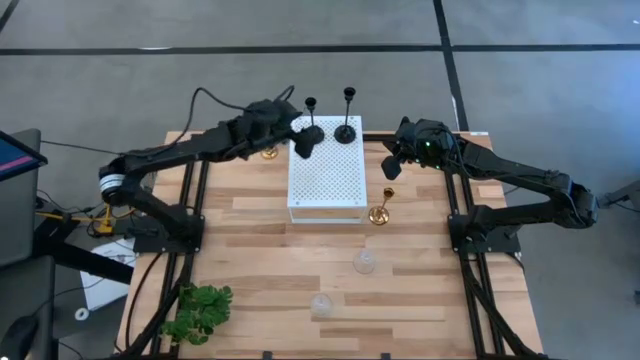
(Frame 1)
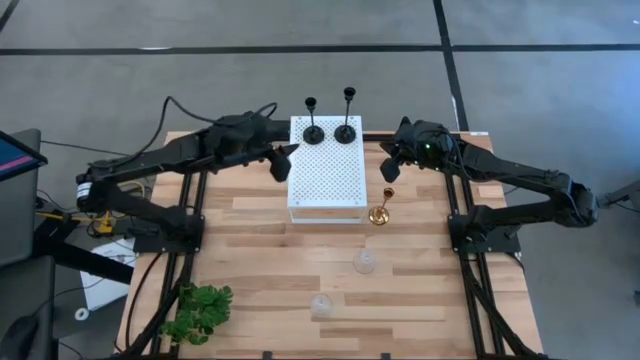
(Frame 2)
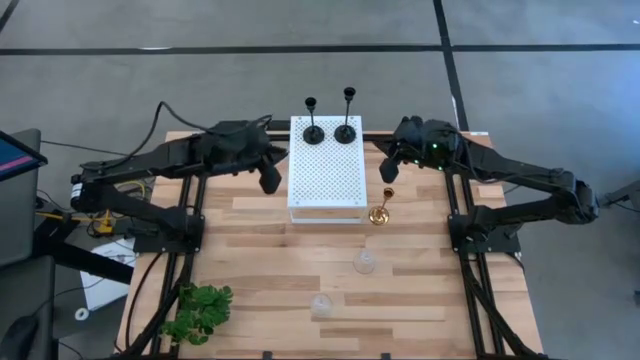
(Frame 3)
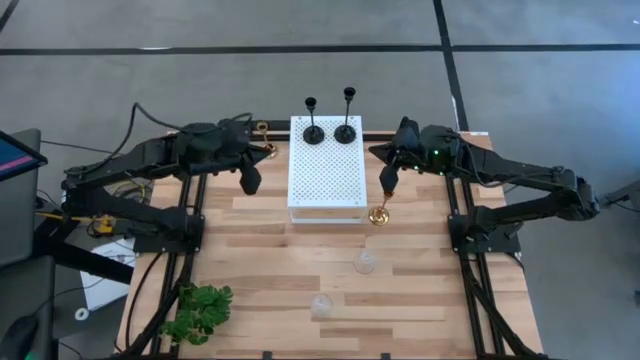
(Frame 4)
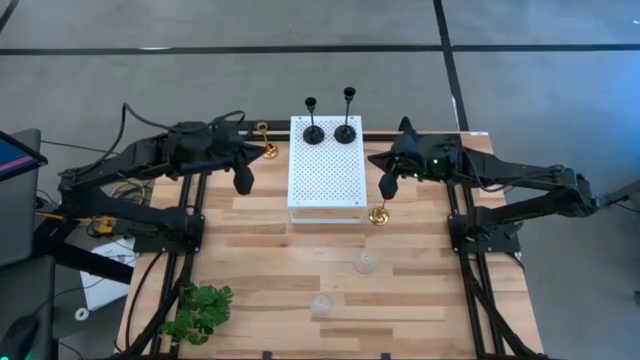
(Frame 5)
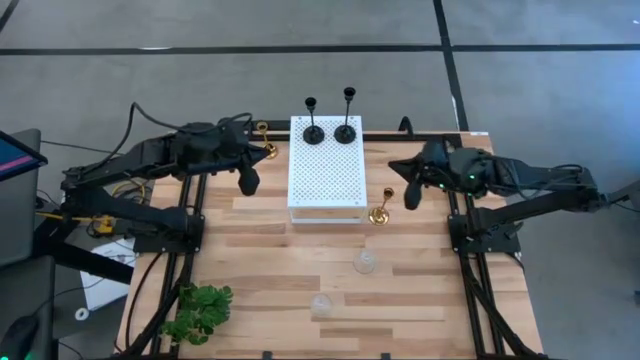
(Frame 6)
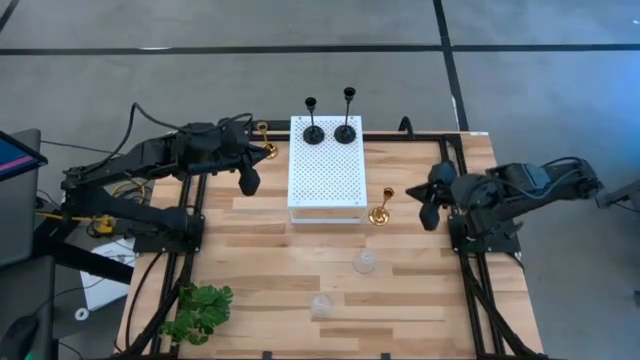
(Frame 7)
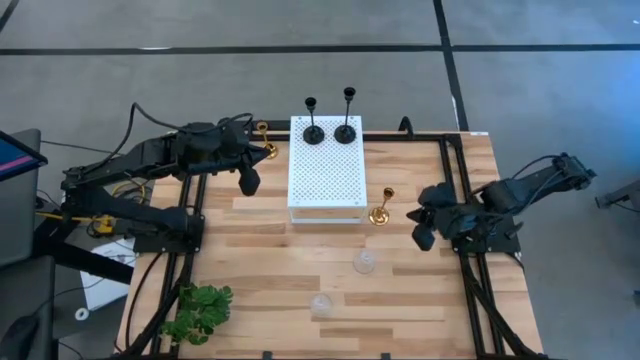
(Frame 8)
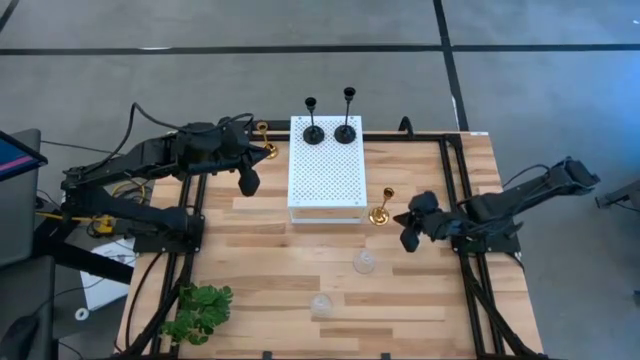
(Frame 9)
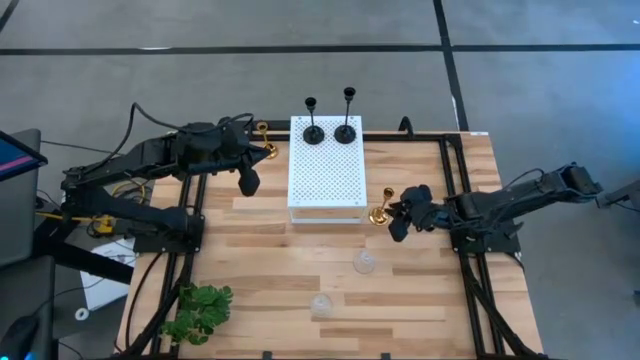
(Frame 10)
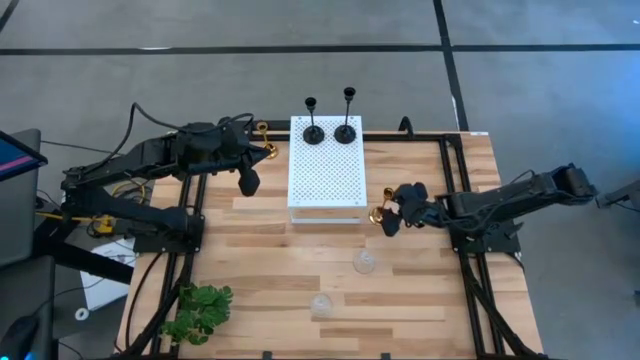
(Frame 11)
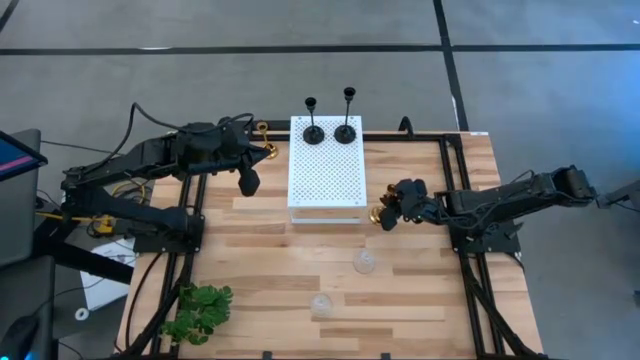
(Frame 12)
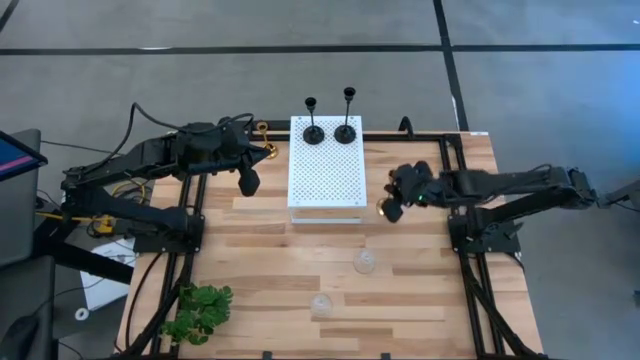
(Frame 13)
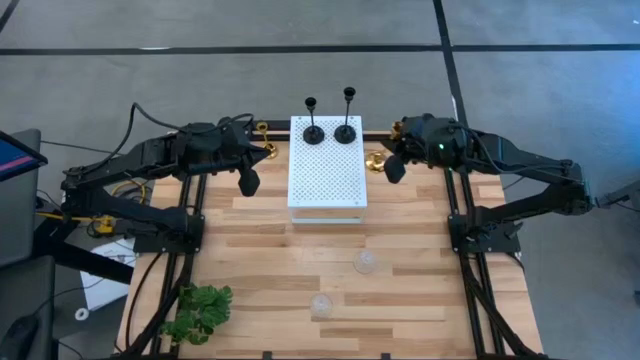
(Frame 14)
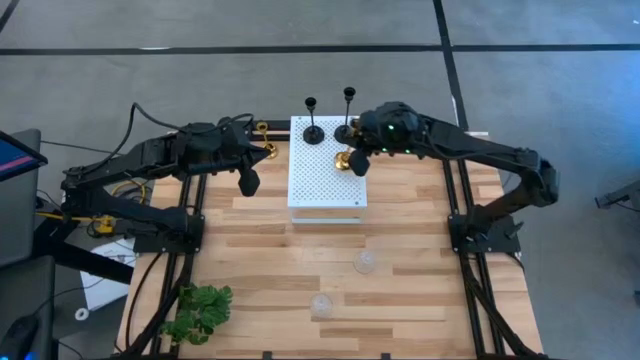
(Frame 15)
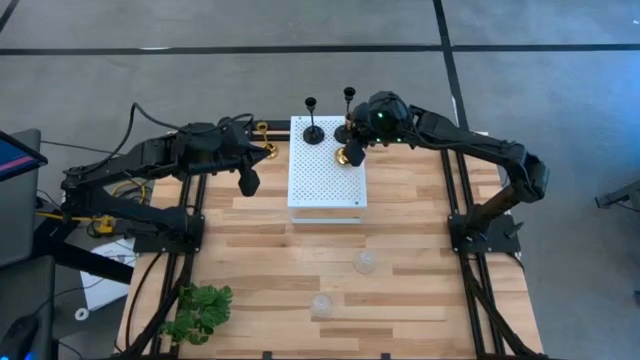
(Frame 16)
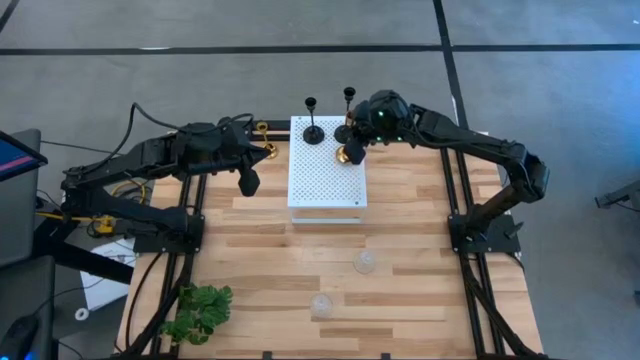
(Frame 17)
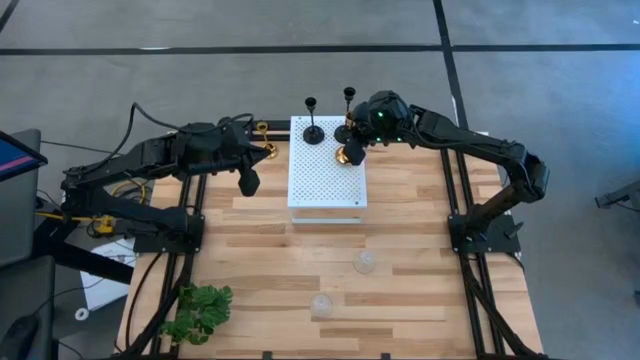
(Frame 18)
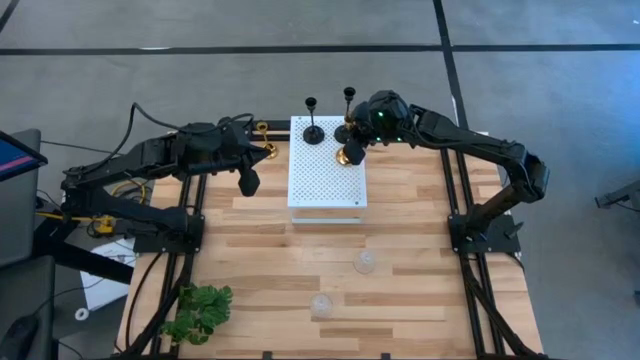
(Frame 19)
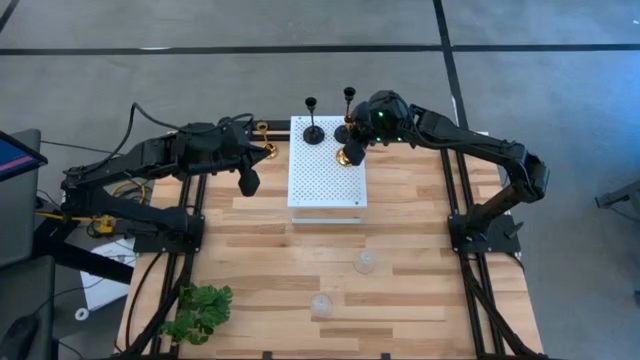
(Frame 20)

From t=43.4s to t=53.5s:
Task: Pick & Place candle stick holders
Put the right gold candle holder on the shelf

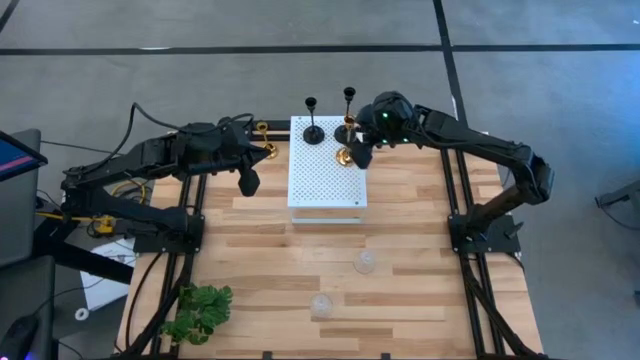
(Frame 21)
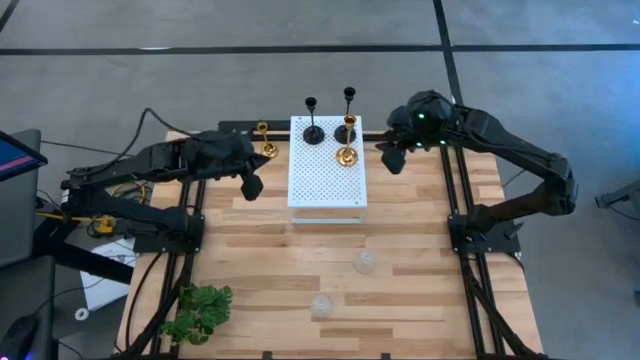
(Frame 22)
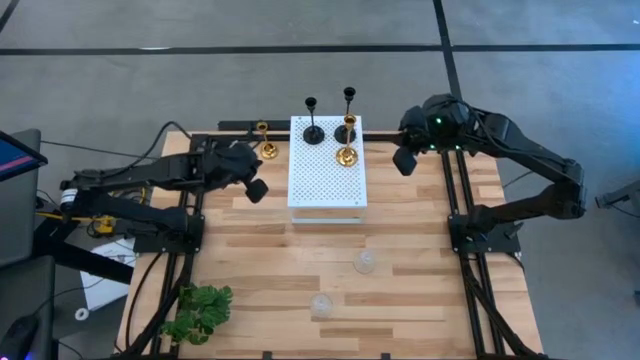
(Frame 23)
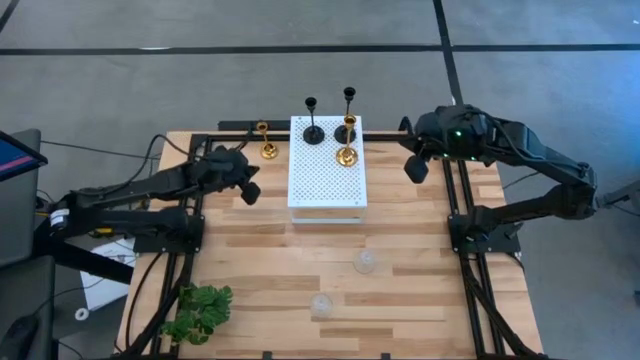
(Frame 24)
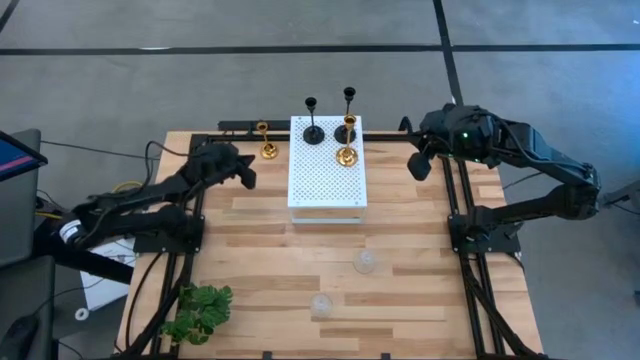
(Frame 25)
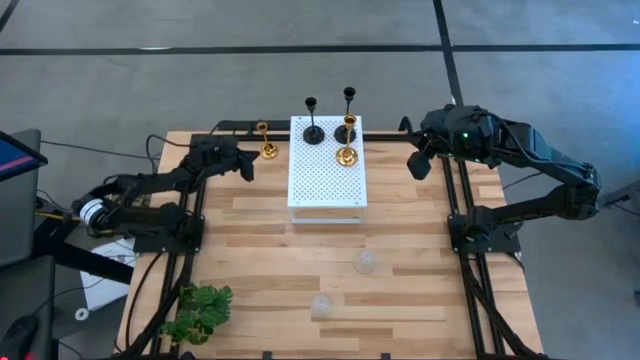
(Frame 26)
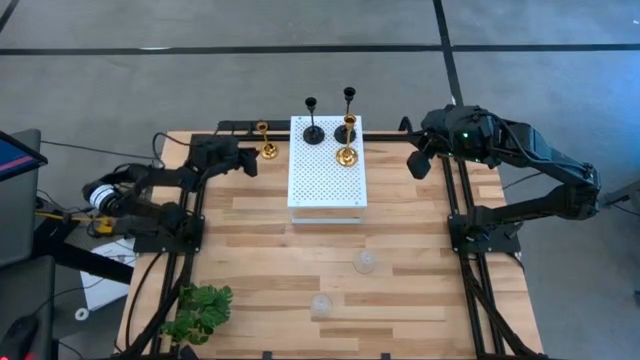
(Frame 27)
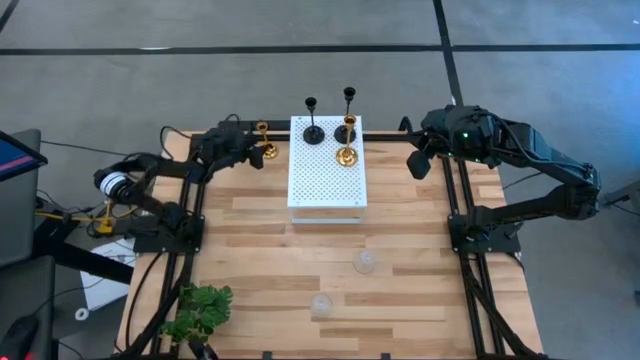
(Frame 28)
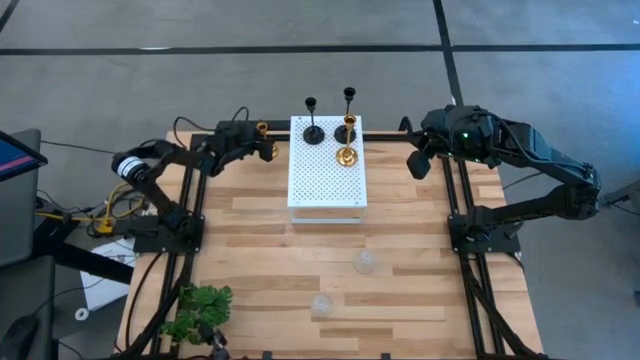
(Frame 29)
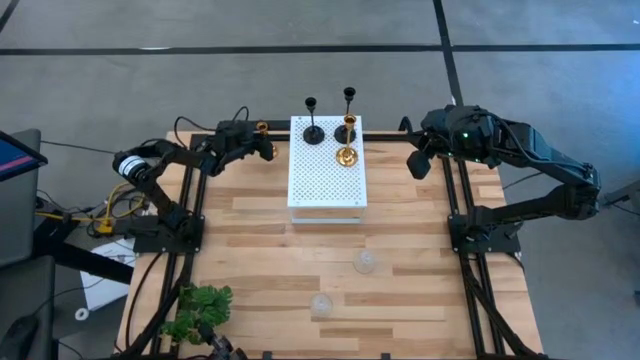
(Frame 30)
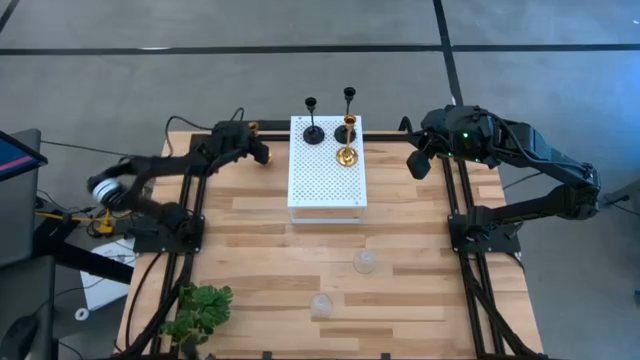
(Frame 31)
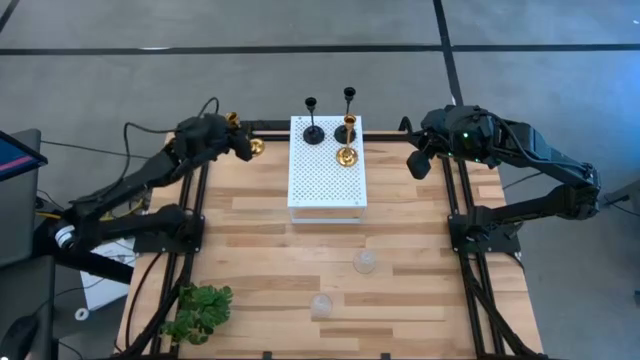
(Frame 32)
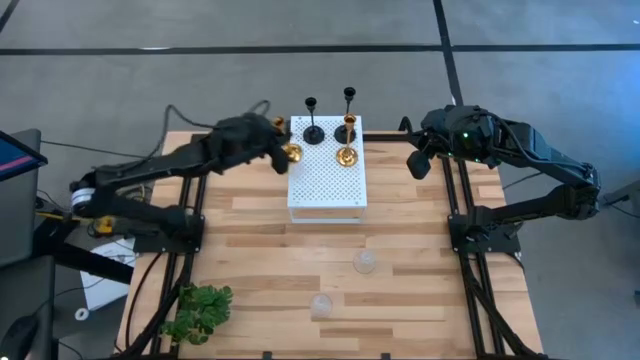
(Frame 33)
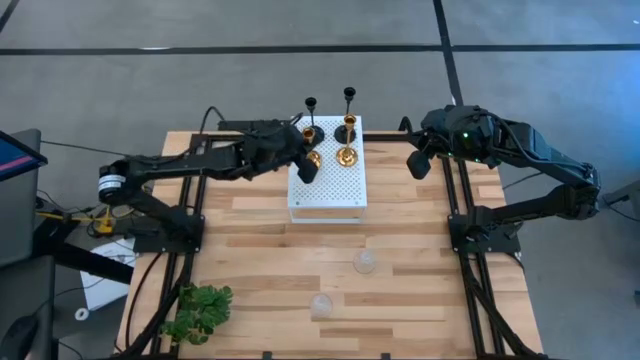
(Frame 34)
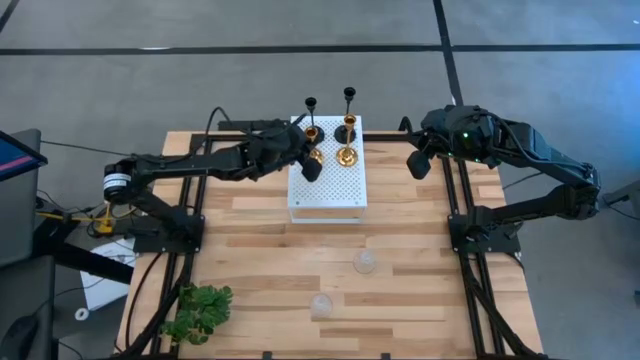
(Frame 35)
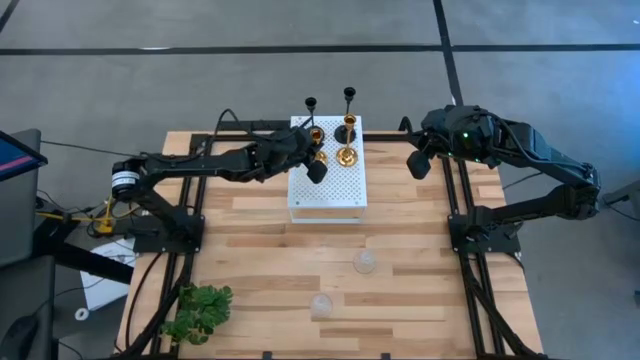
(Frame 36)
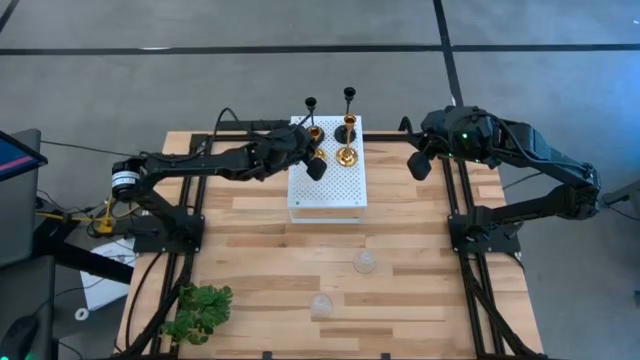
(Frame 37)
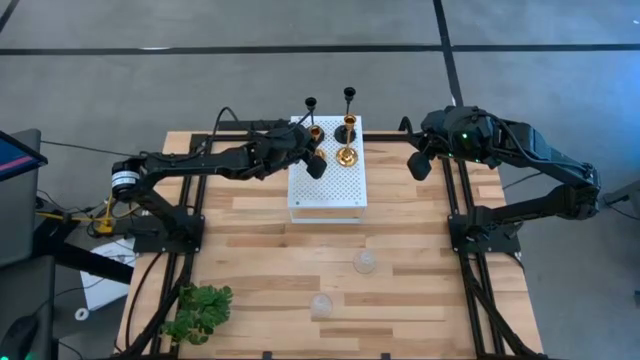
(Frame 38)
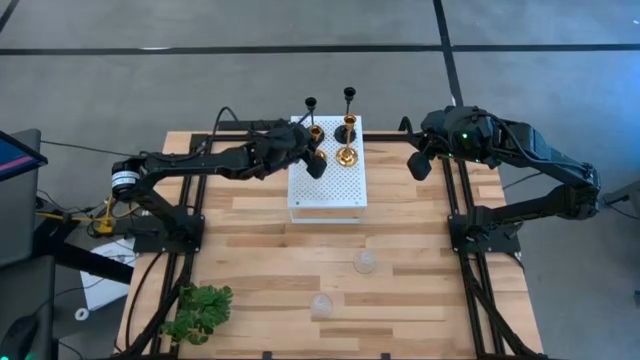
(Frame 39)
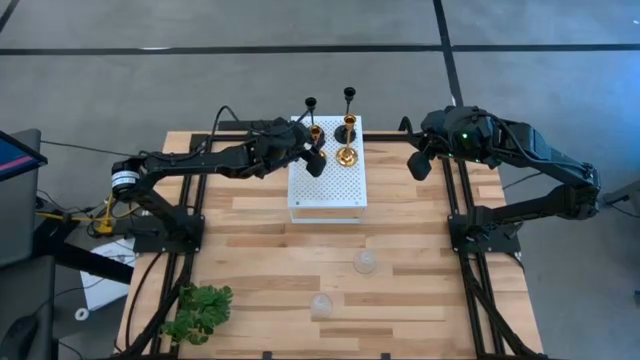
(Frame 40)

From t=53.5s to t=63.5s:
Put the gold candle holder on the shelf

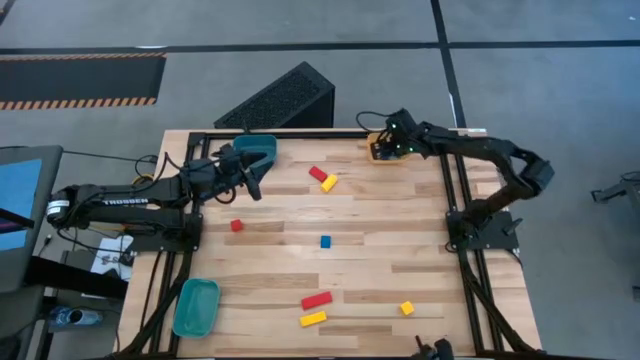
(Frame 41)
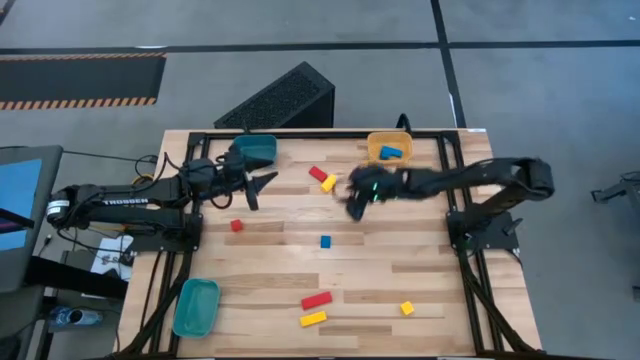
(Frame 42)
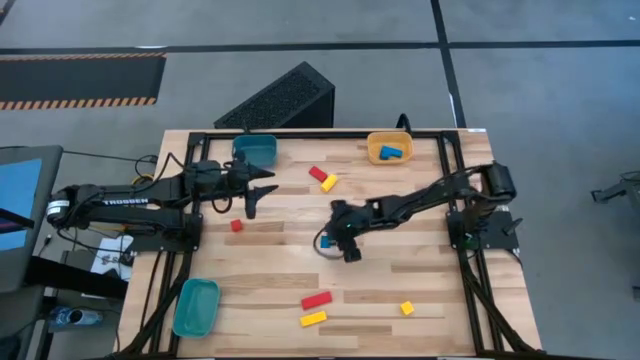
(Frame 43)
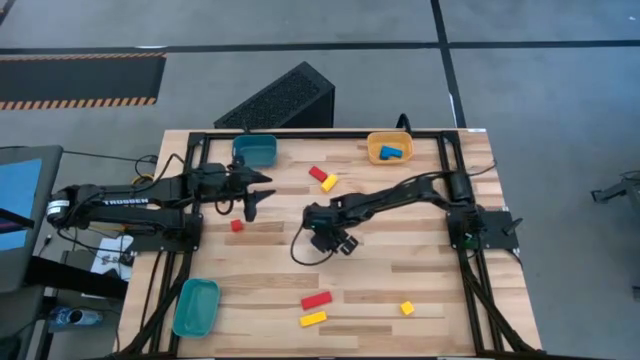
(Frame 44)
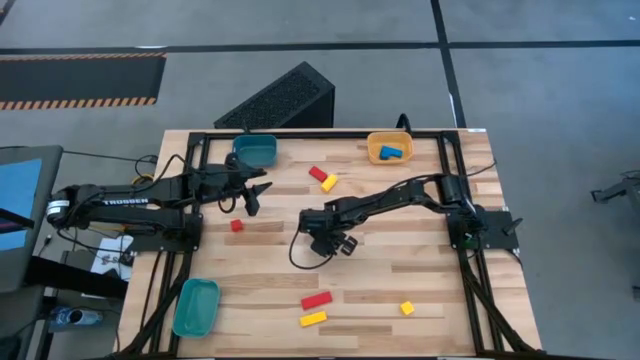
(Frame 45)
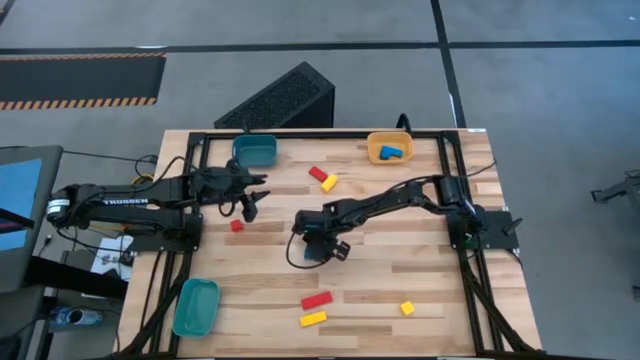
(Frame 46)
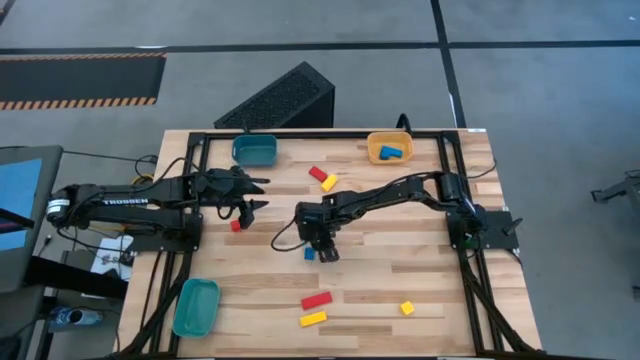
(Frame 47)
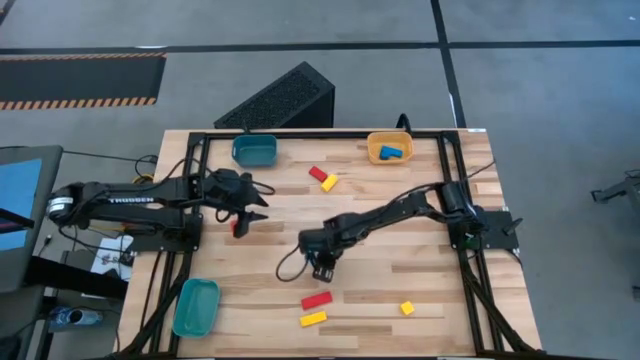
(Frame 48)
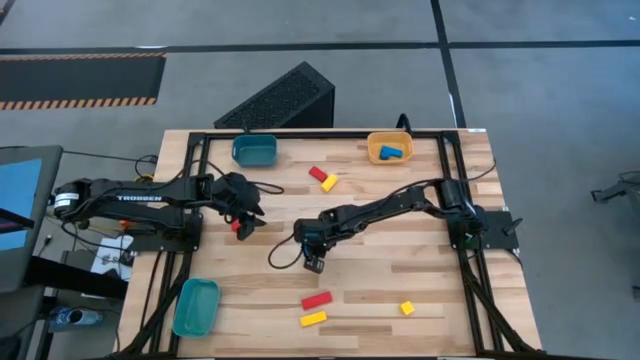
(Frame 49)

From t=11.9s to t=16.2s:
Task: Sort & place blocks by color
Put the blue block into the yellow bin
